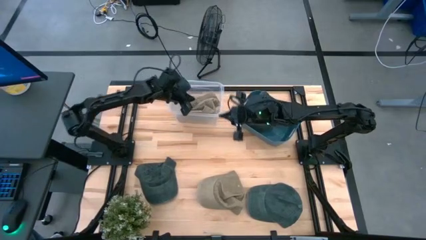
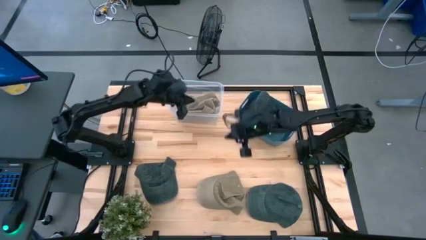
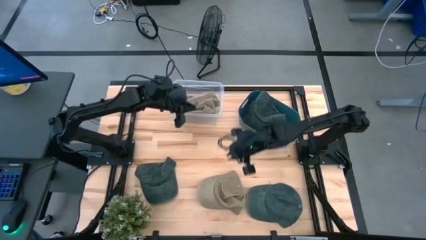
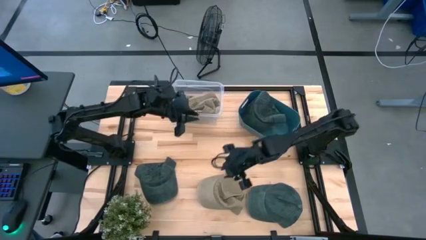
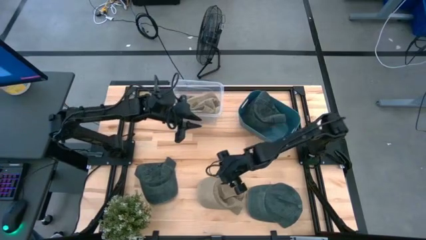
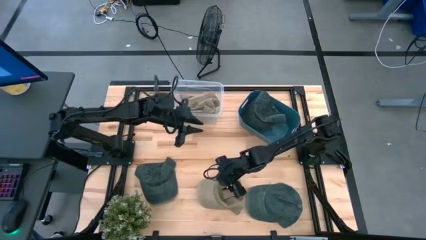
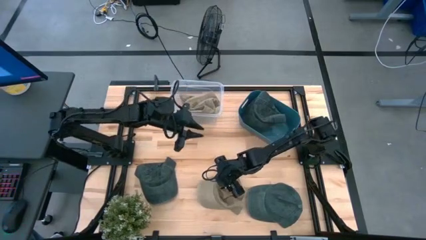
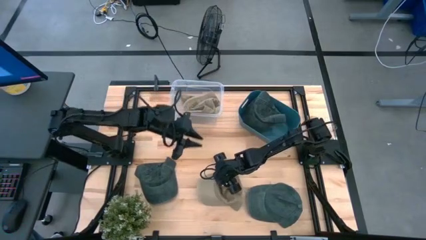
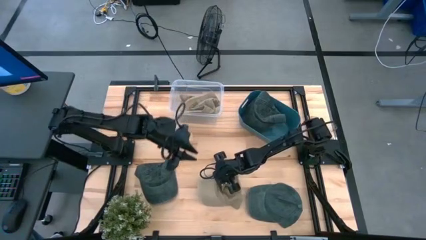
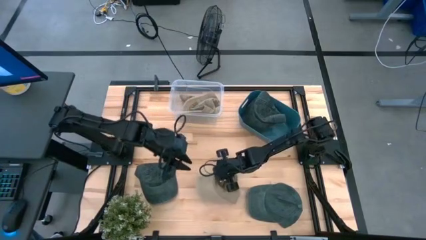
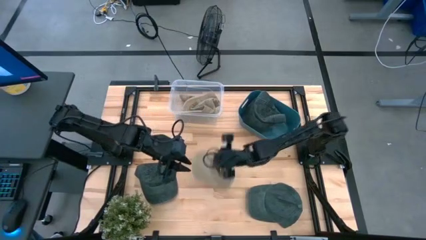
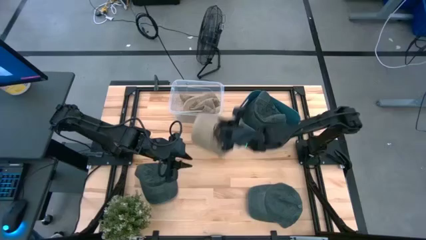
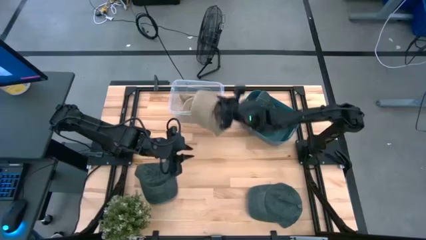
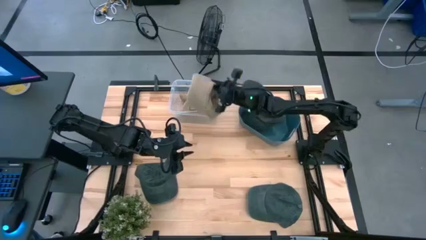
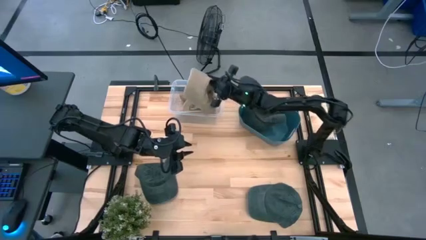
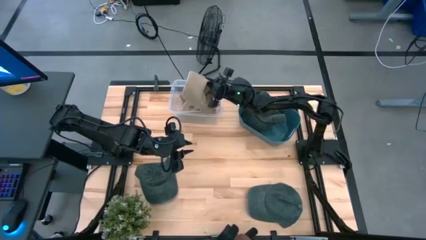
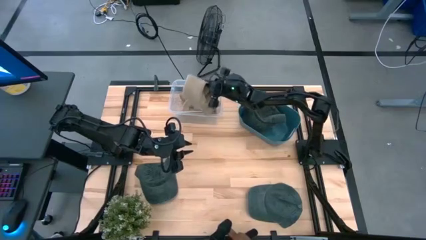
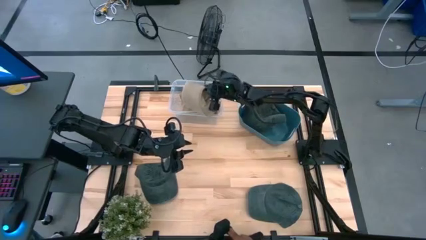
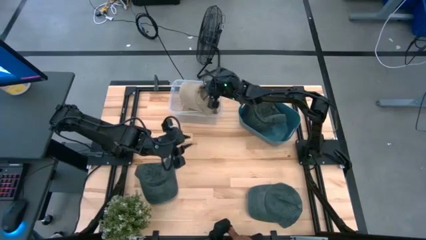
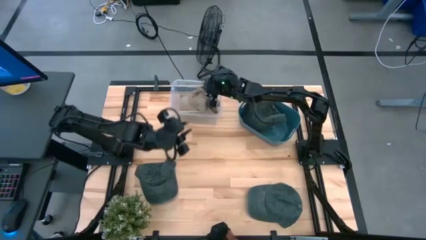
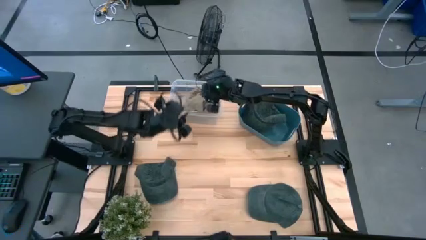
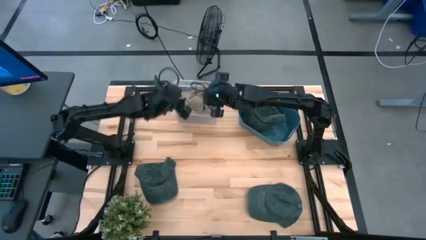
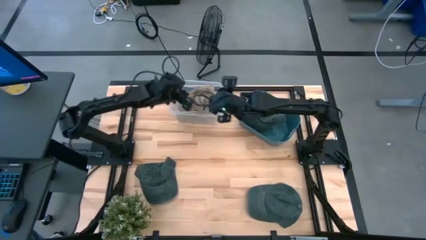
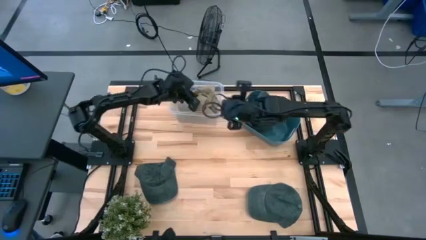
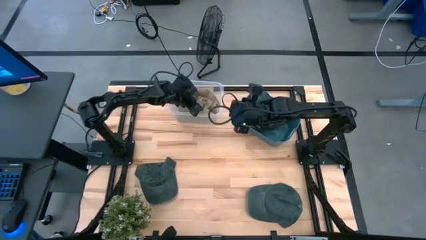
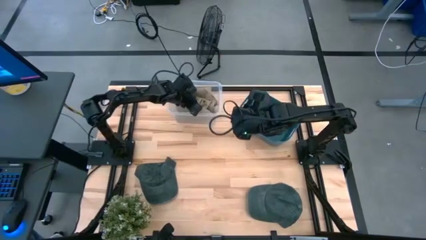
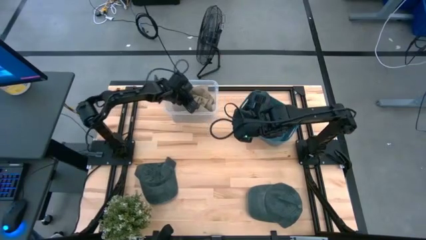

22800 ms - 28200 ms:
Task: Pick & Place hat
Put the brown cap into the transparent bin

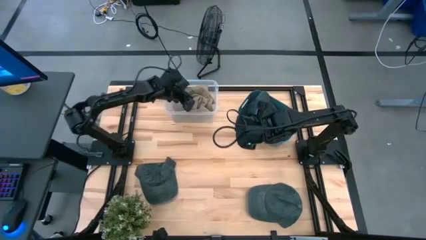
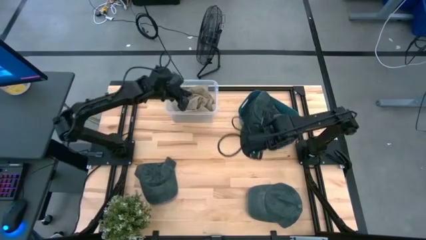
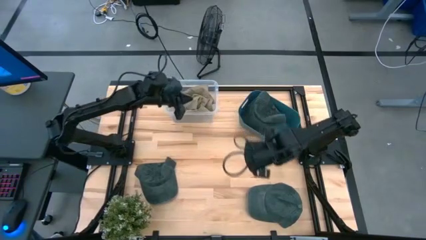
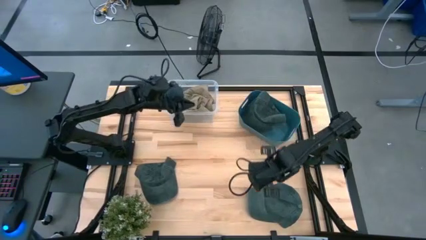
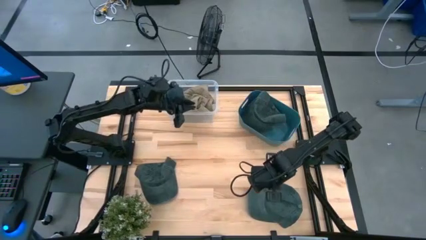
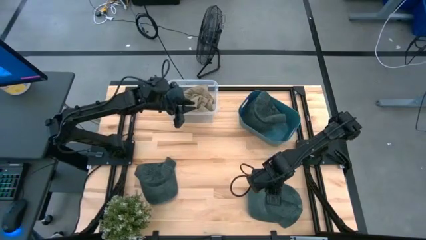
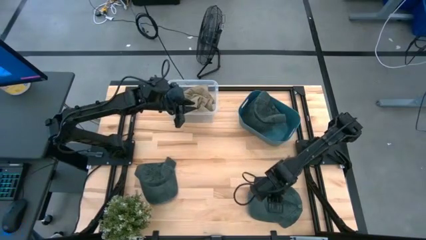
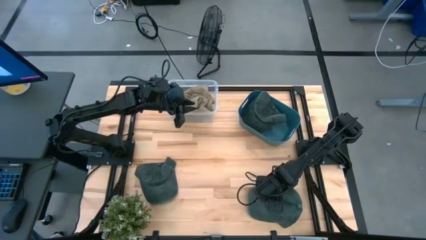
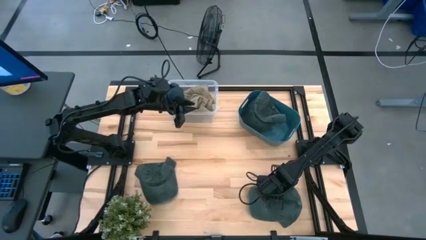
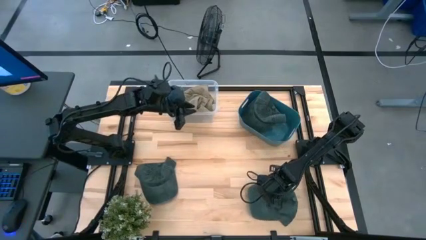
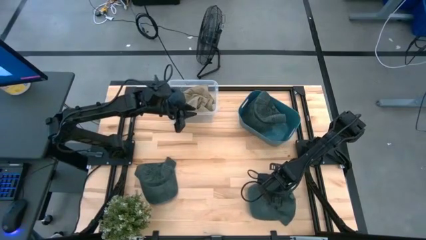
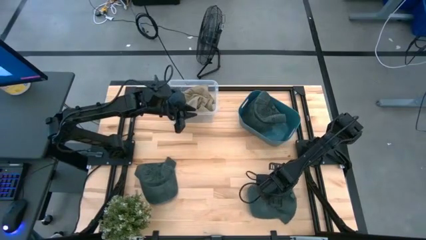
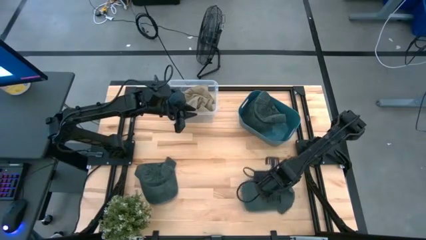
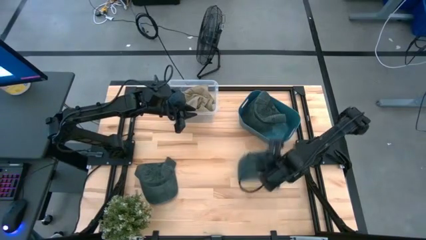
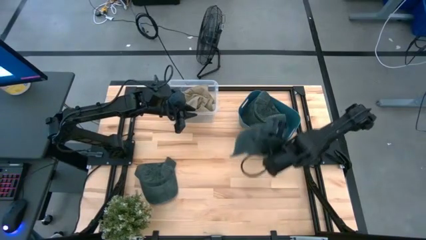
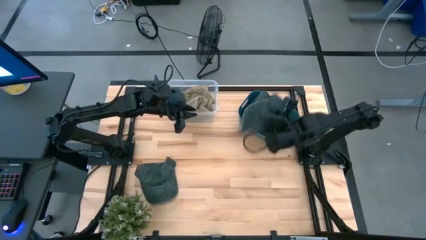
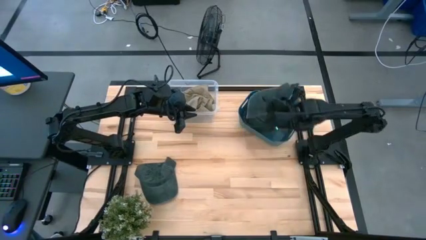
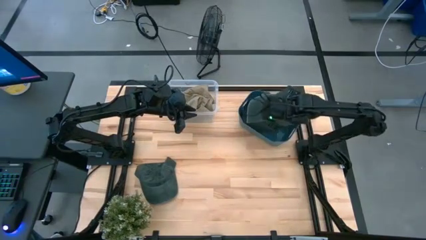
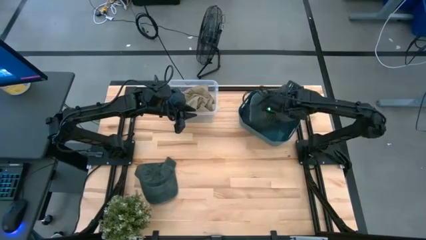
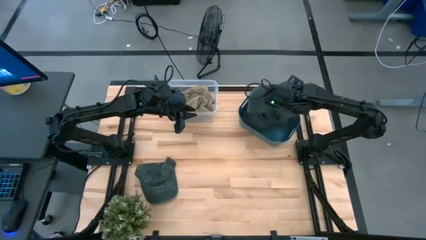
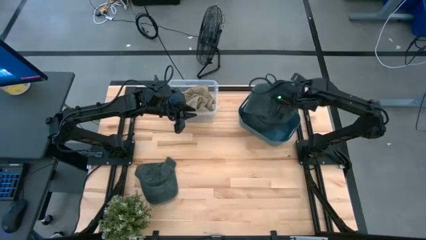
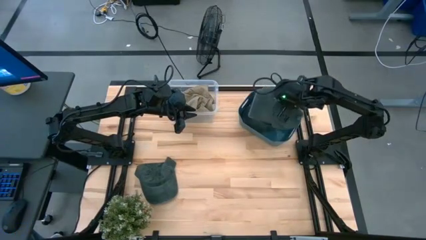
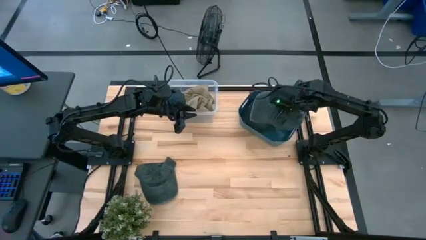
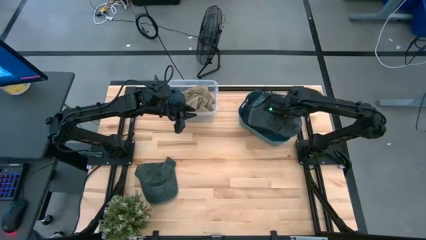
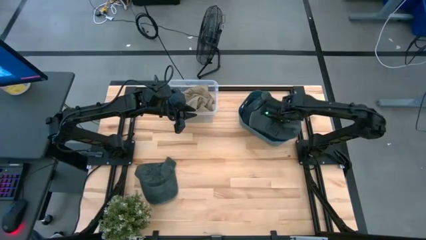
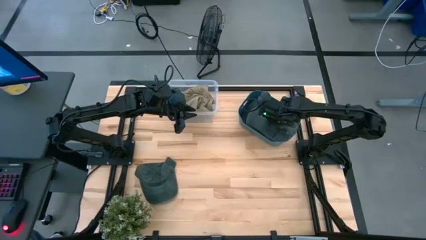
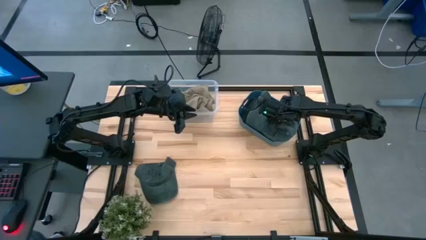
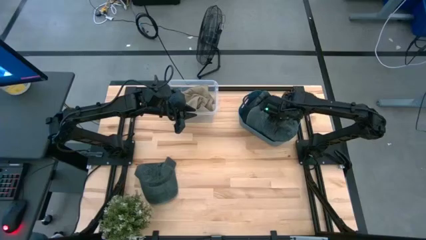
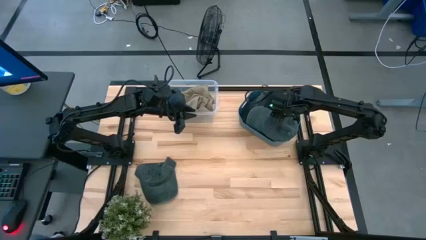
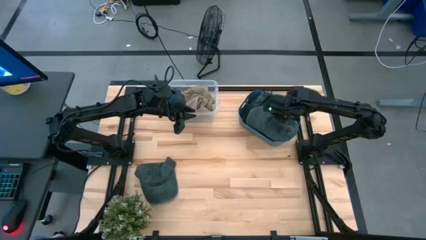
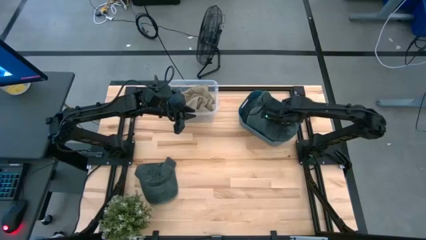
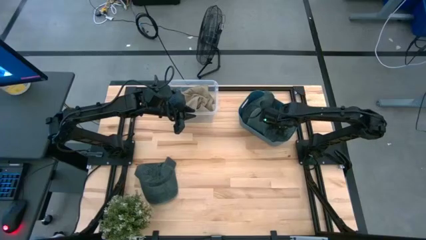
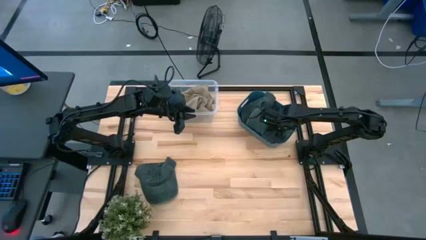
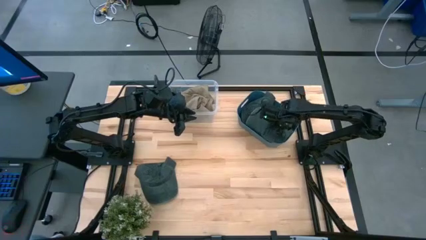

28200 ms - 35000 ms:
Put the right black cap into the blue bin

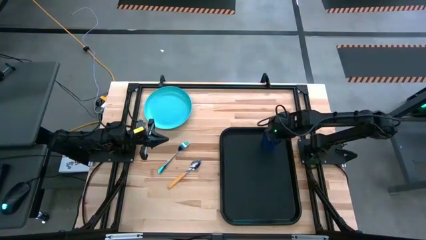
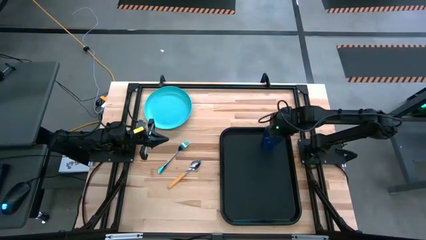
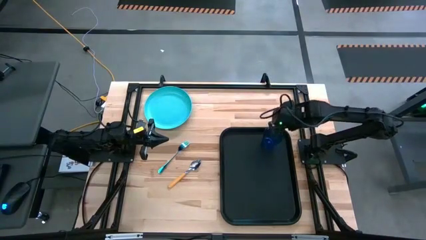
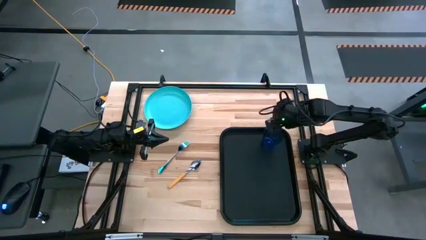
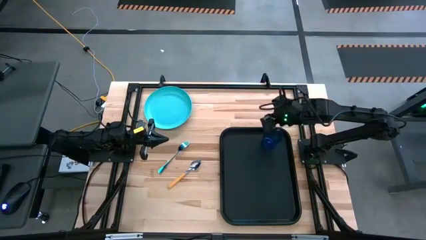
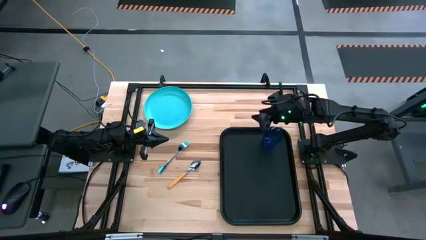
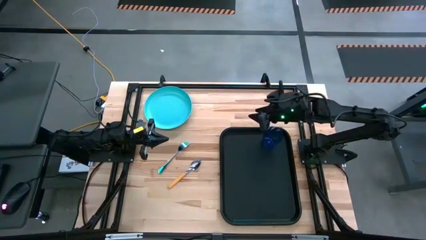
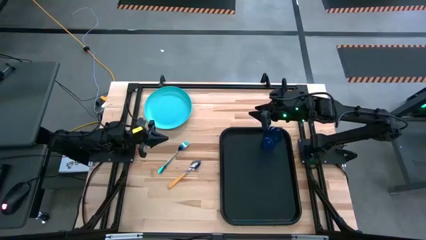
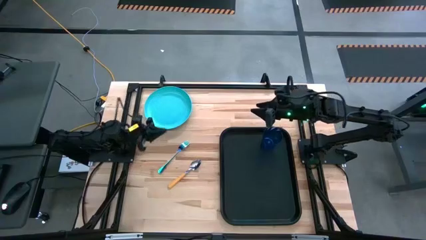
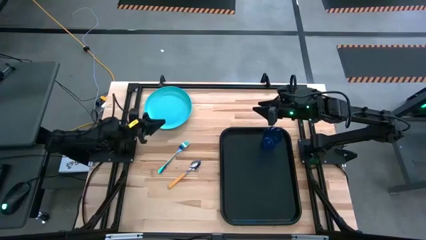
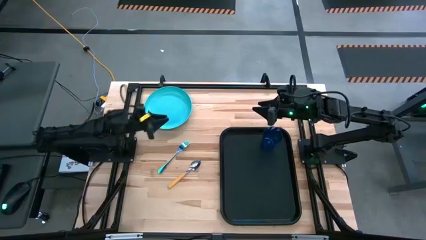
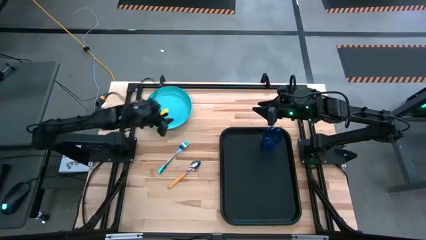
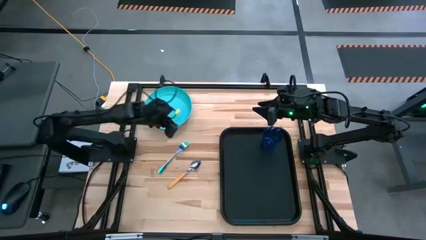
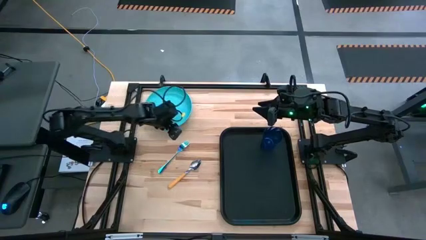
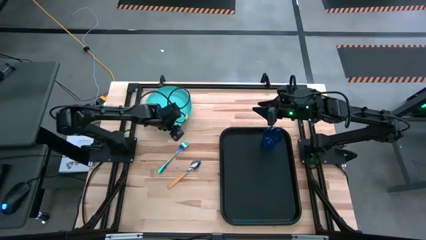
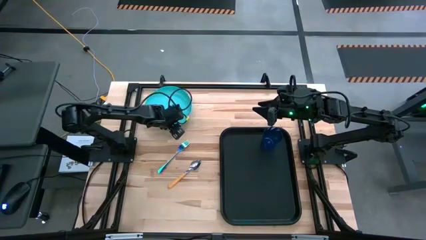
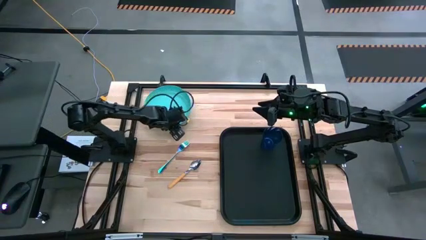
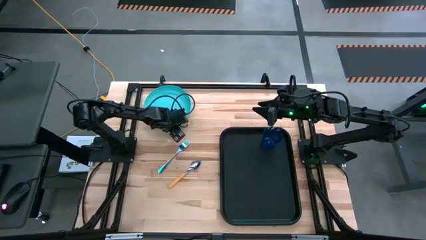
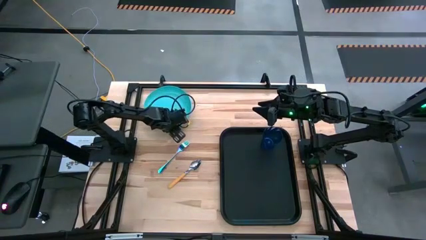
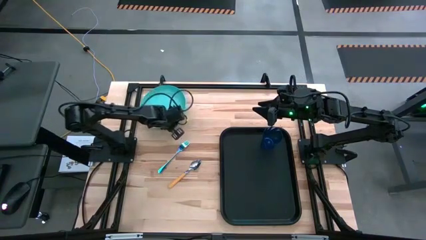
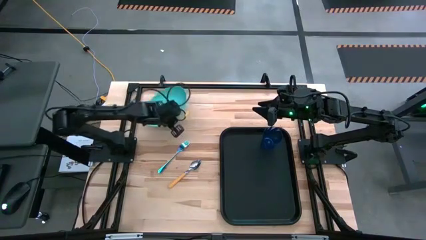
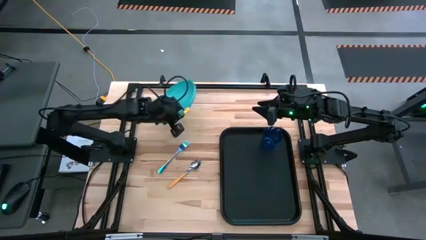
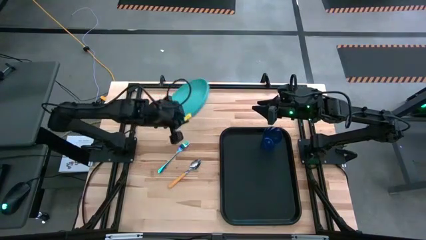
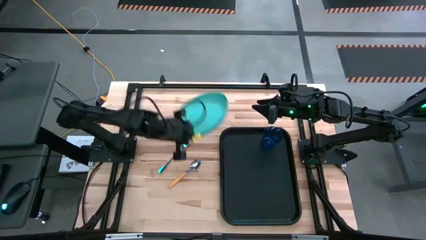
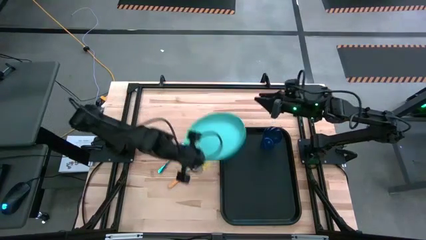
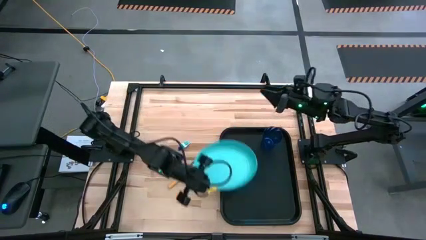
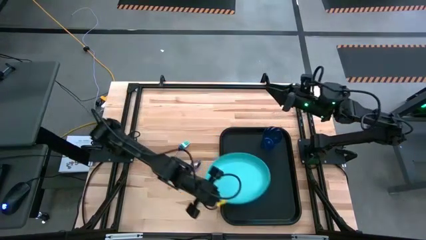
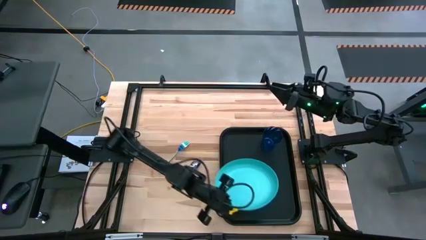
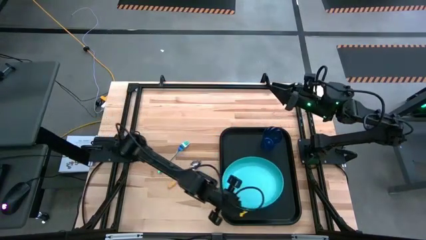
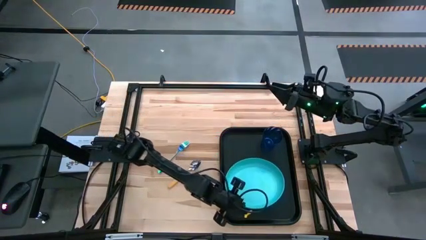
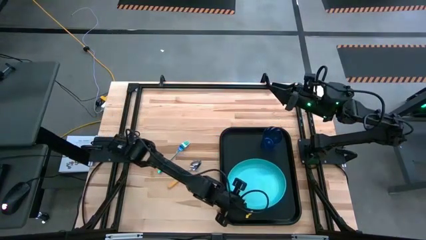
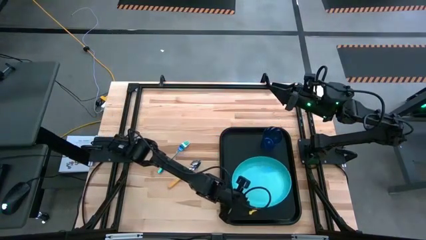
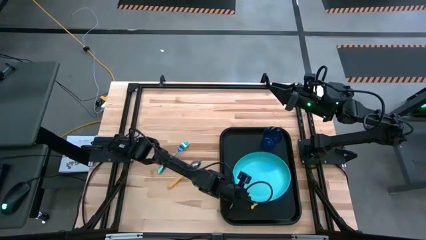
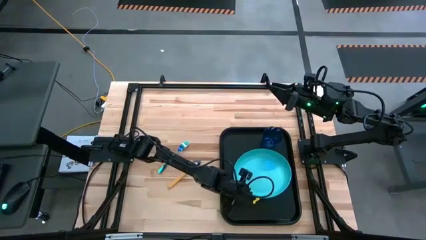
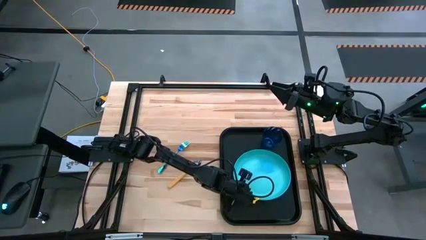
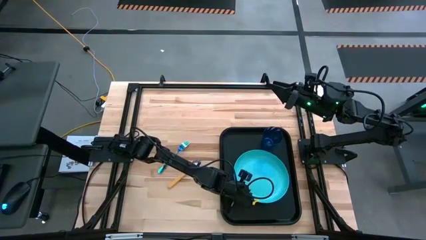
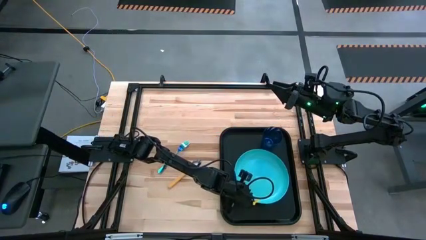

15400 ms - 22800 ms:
Task: Pick and place plate/cup/fork/spoon on tray
Put the blue plate on the black serving tray to the bottom of the blue glass
